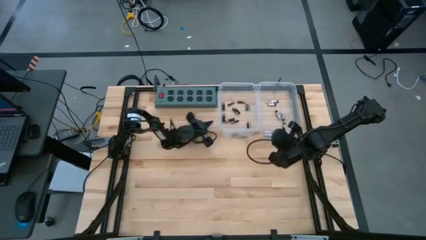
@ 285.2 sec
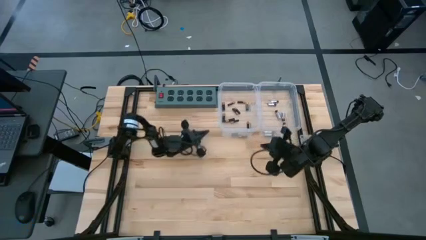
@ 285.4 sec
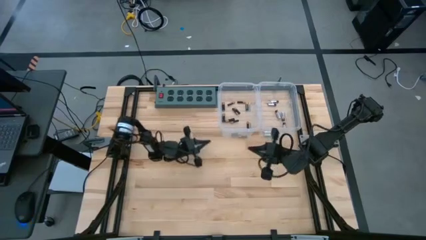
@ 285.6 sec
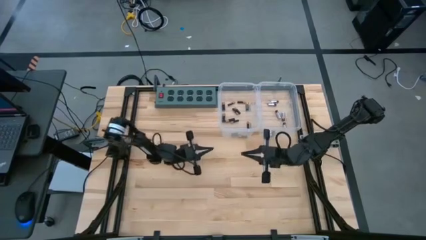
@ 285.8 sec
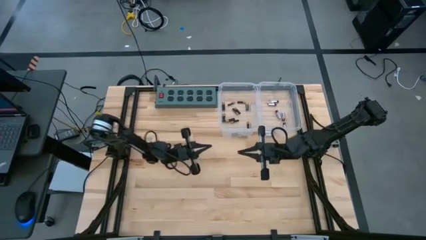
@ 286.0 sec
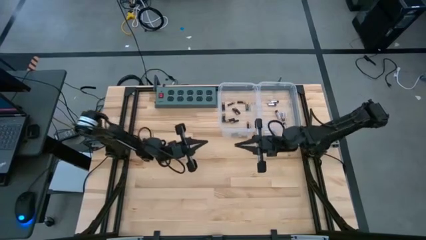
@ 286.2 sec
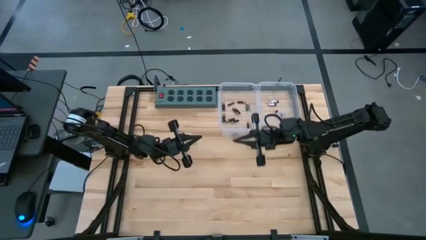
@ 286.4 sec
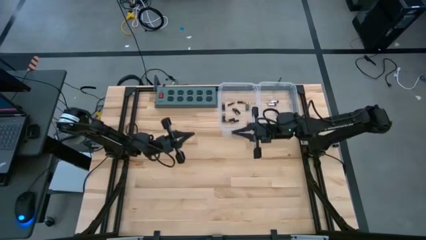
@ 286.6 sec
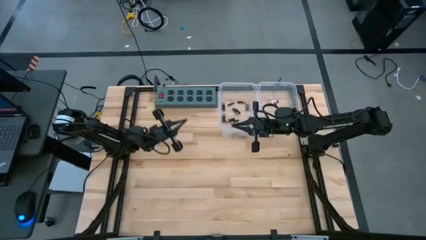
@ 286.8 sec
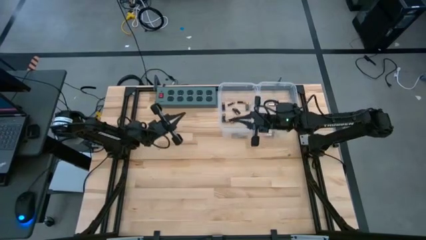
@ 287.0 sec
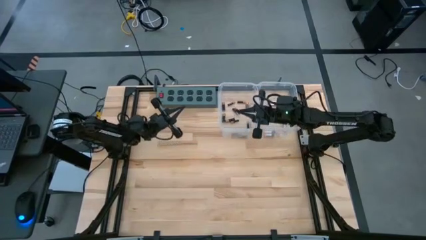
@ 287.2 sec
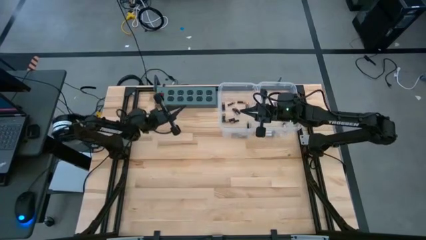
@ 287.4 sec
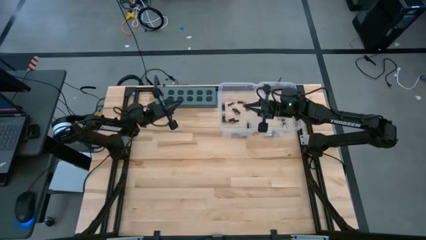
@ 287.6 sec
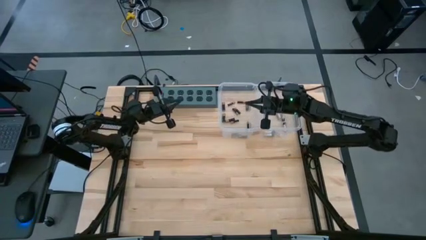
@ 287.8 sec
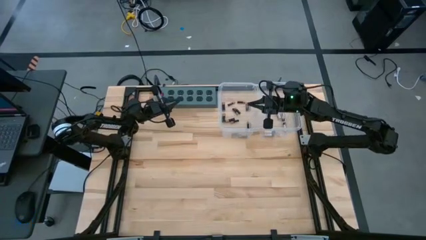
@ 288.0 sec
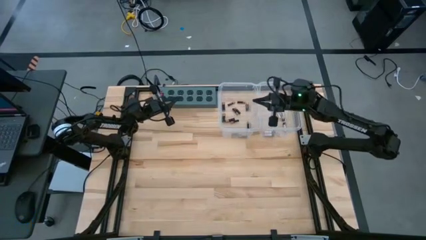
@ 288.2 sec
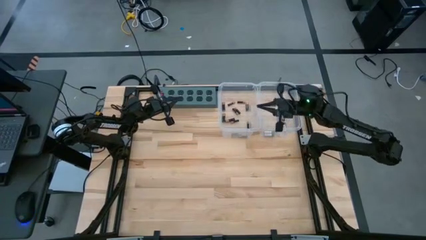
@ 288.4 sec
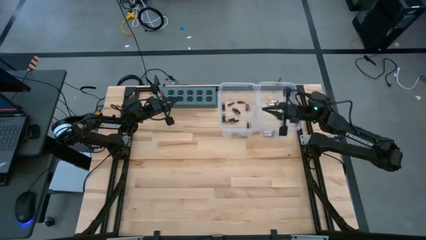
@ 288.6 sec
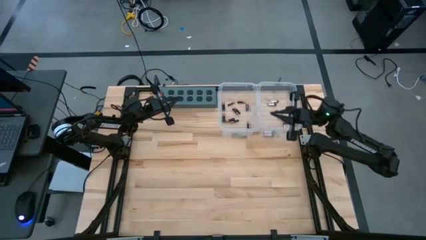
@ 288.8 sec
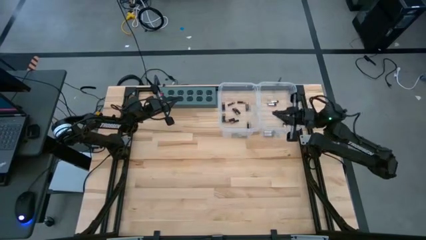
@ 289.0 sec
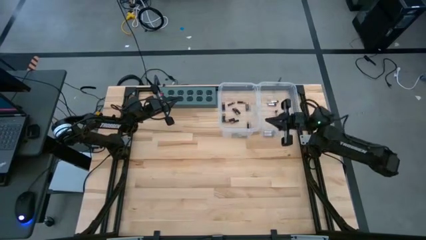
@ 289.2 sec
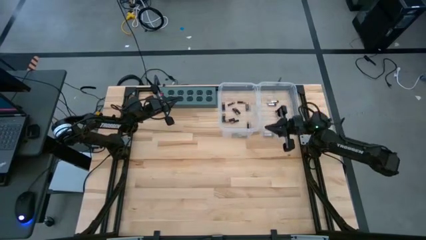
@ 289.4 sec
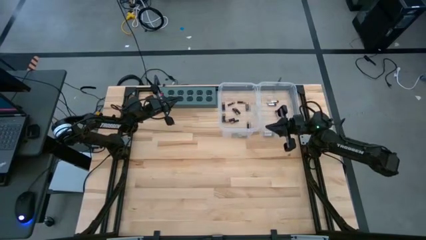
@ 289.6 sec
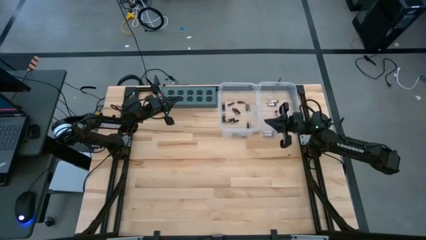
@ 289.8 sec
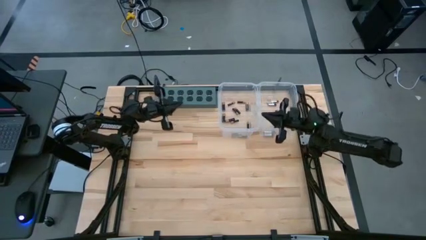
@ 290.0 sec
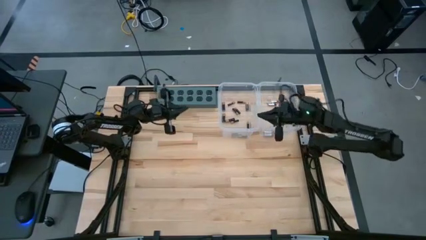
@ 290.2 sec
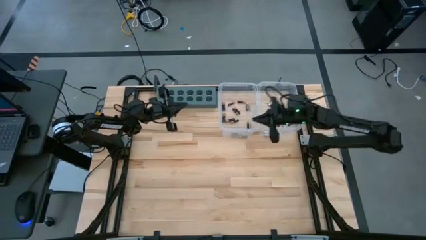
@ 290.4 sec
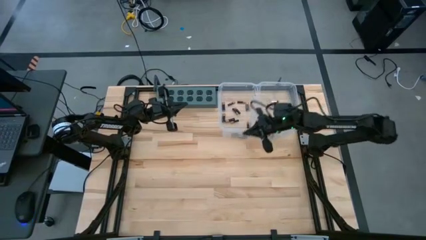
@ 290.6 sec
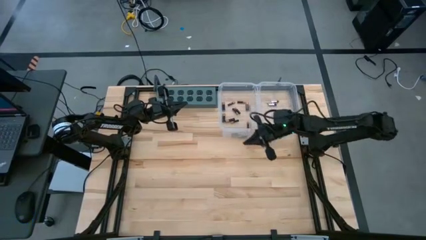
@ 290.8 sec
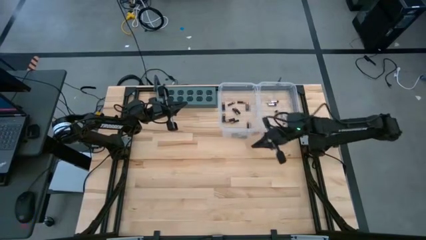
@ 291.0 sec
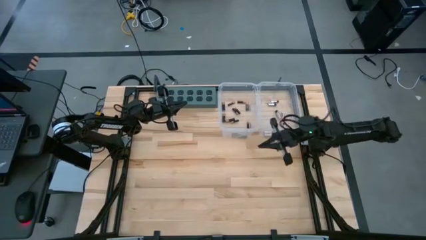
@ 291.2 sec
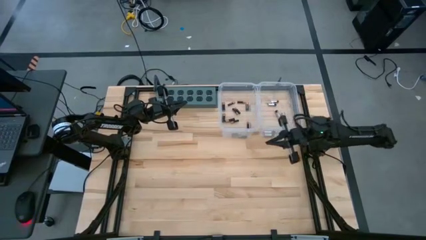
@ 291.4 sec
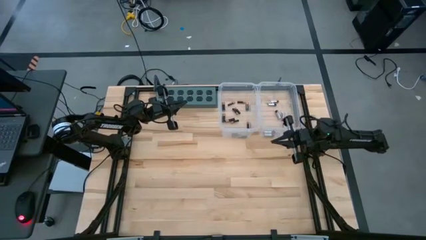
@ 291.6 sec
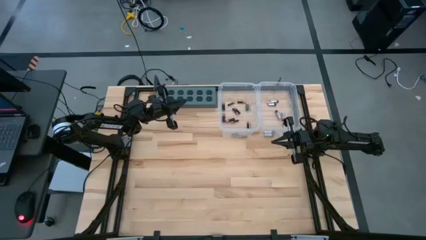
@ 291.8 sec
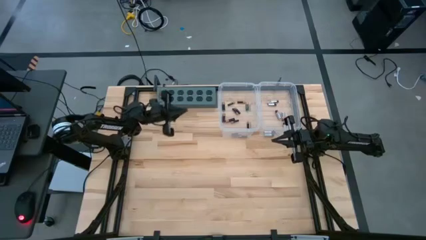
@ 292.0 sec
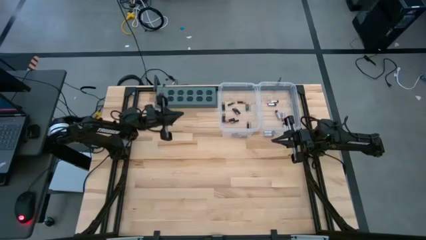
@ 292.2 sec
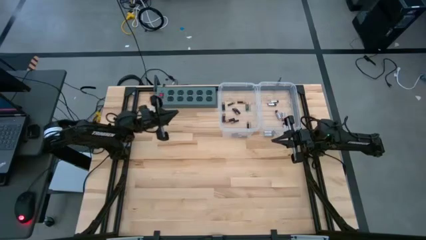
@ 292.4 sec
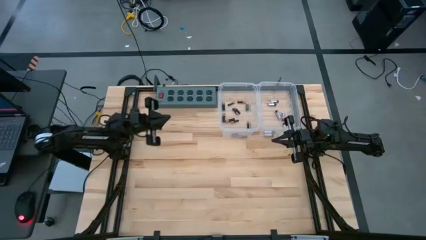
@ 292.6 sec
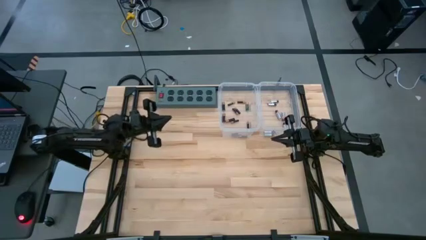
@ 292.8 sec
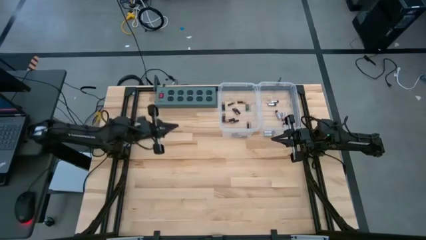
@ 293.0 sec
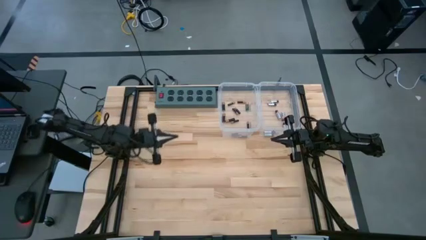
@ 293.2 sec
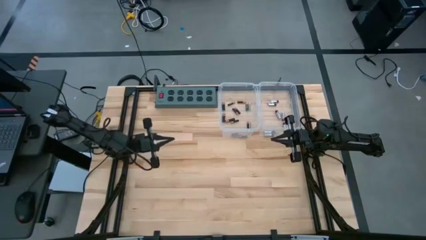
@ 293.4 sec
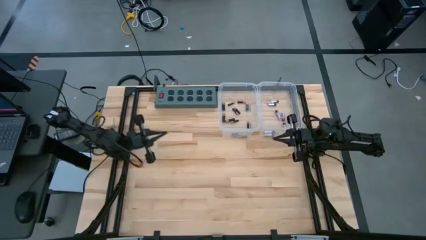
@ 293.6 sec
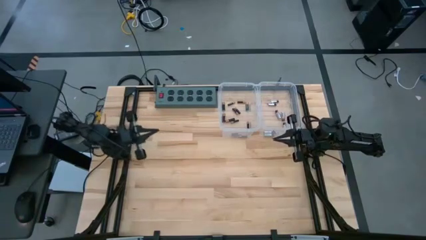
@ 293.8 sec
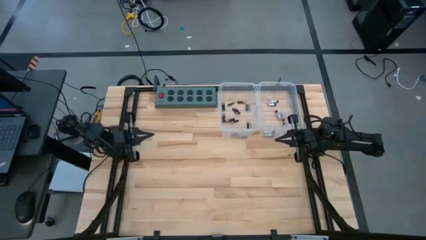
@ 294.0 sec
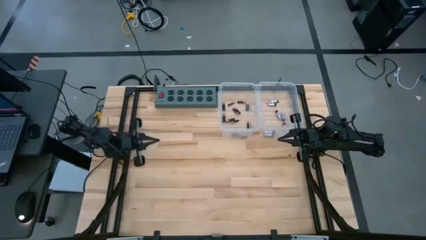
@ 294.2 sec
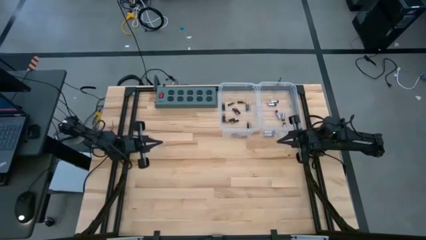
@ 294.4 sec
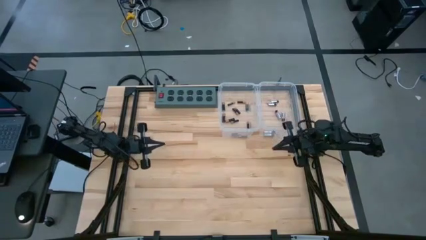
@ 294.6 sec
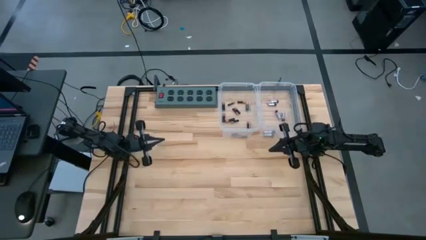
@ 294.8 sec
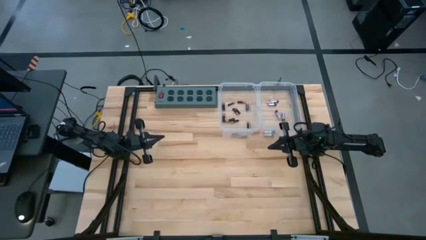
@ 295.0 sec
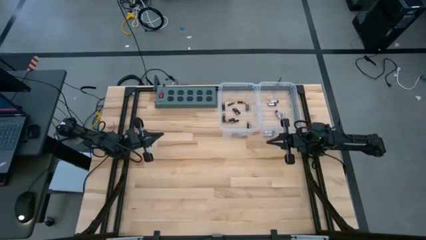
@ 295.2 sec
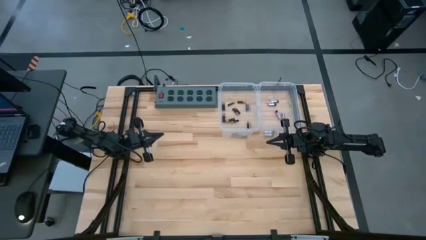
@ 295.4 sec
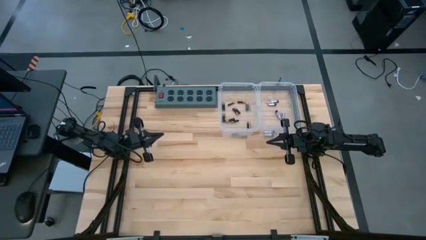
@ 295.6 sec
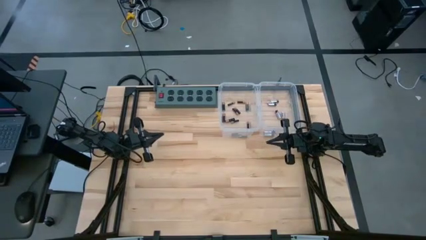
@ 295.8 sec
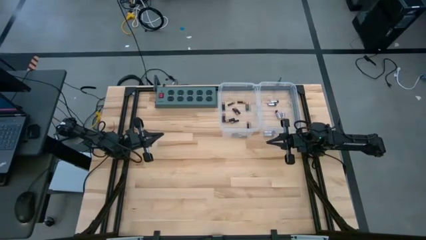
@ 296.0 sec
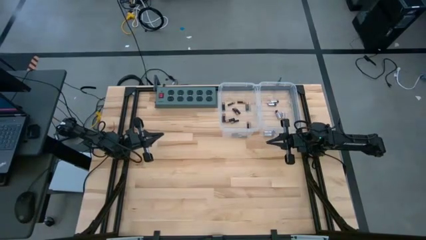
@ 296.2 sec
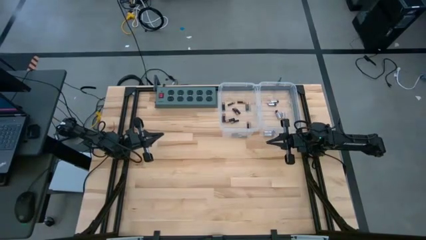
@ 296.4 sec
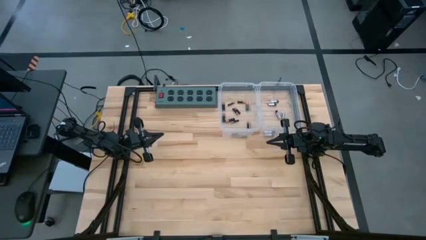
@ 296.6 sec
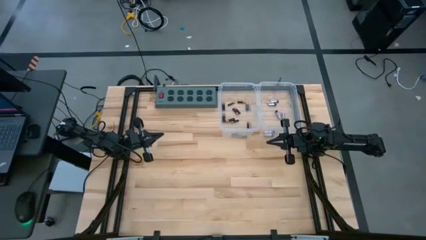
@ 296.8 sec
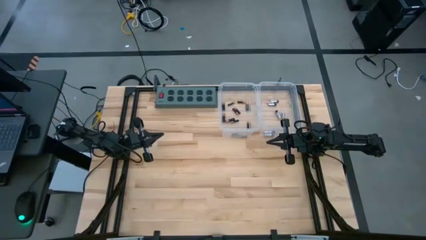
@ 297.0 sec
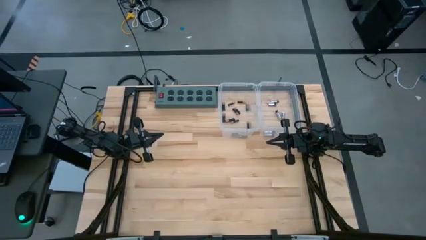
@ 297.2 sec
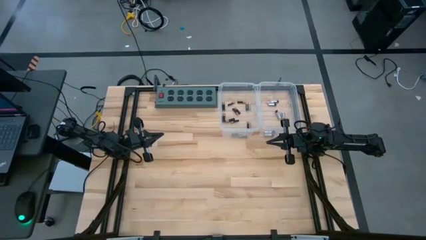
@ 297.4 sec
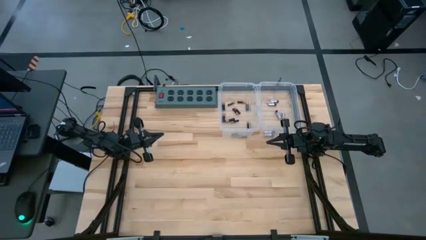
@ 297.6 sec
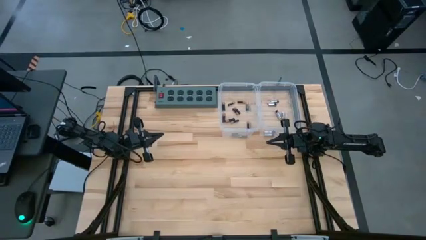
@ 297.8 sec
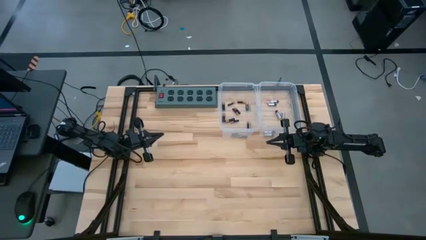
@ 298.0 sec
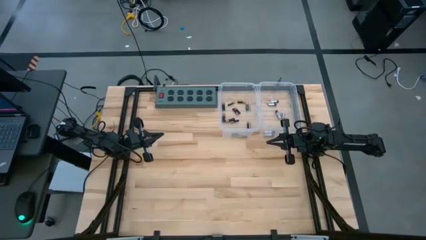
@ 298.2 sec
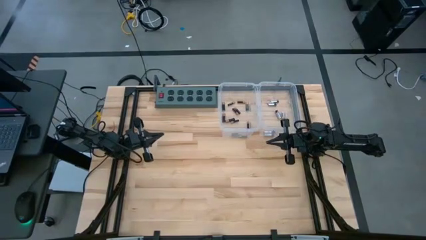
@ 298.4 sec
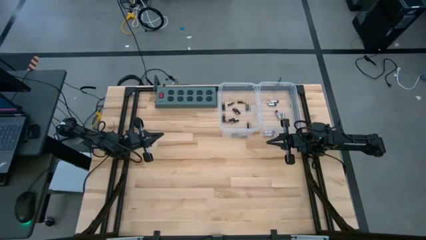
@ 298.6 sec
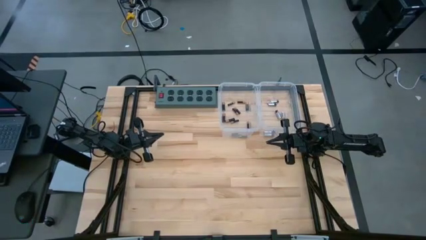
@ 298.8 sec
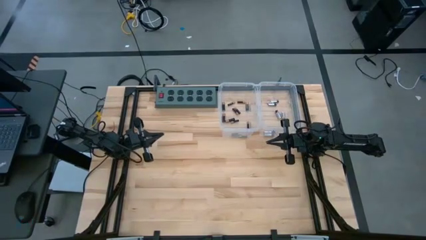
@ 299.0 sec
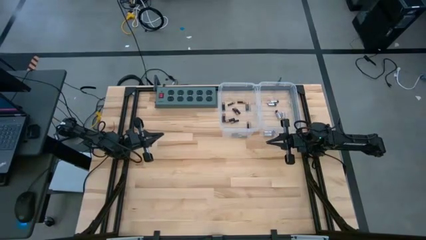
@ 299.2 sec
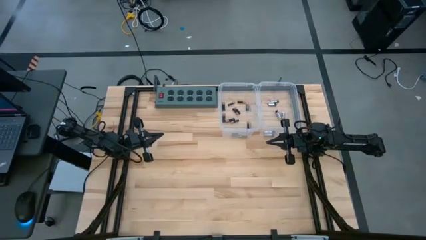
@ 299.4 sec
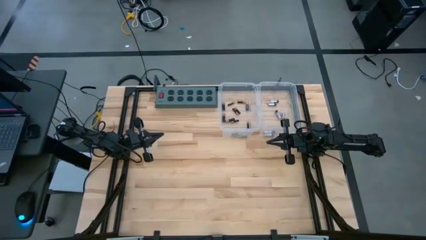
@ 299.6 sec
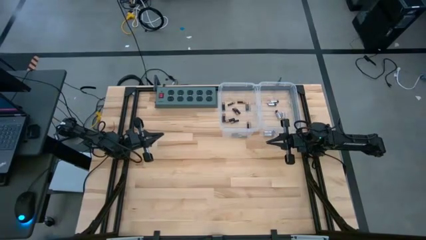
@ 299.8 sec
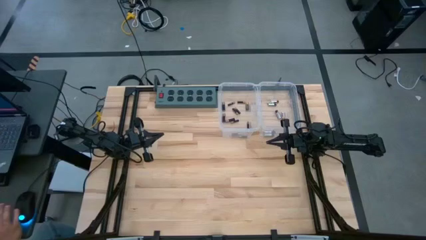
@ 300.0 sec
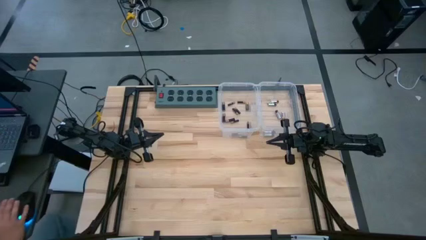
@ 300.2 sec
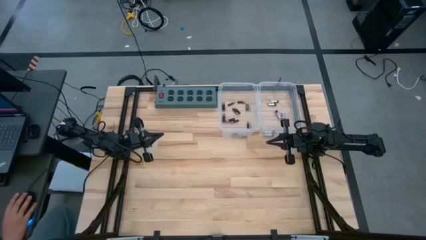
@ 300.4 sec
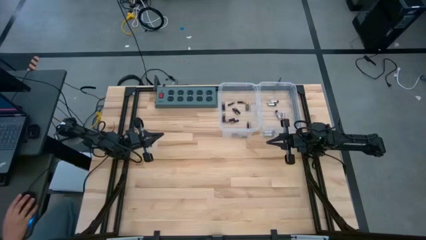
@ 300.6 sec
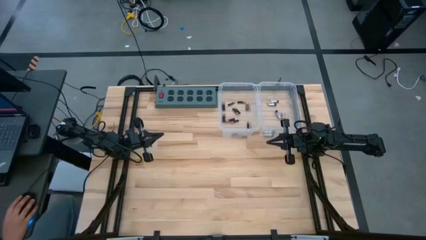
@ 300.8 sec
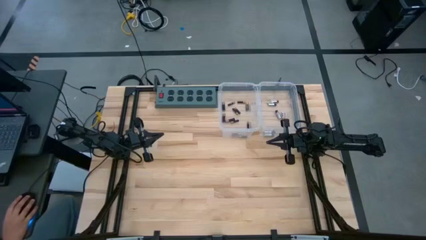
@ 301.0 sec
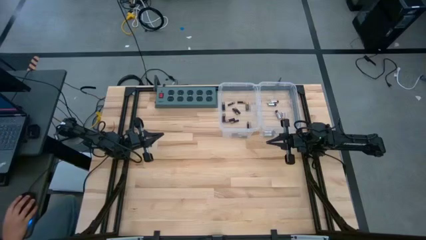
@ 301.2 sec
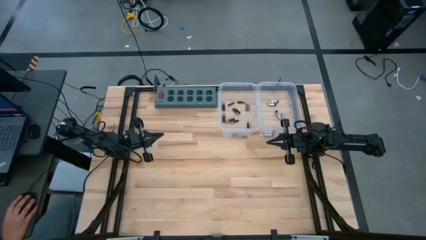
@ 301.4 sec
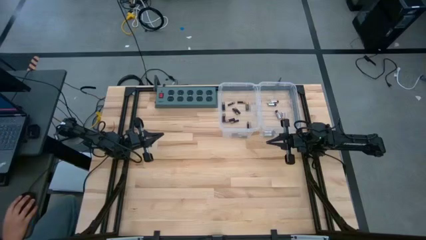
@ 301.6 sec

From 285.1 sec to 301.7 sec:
Task: Sort batteries
Return to Home Position

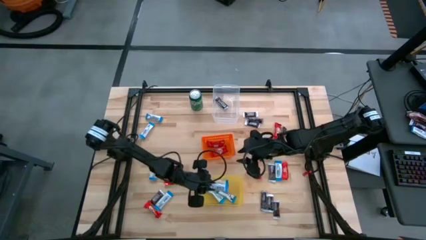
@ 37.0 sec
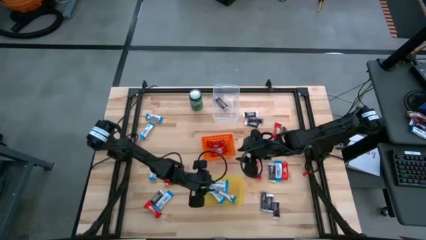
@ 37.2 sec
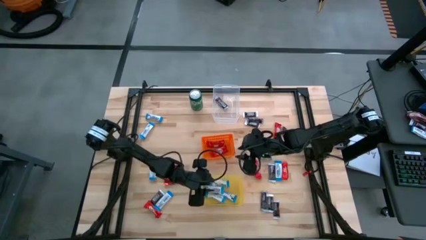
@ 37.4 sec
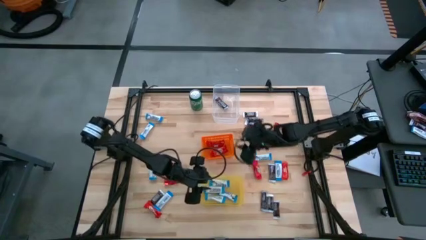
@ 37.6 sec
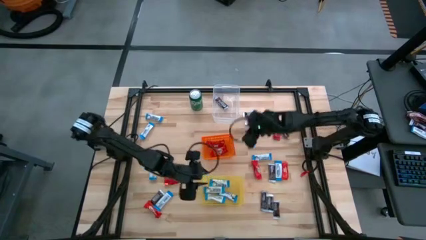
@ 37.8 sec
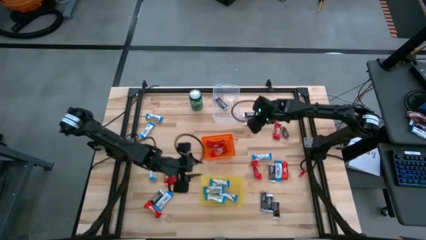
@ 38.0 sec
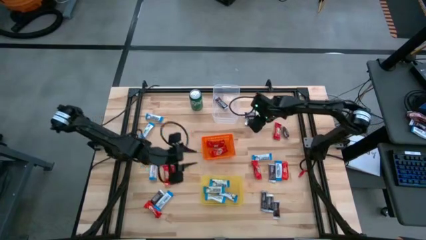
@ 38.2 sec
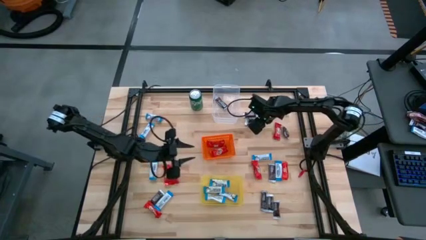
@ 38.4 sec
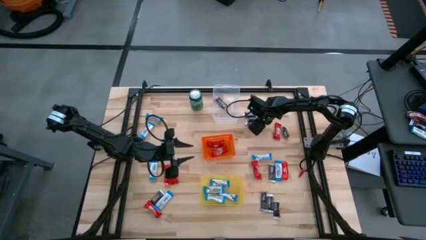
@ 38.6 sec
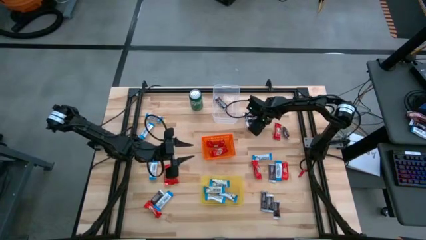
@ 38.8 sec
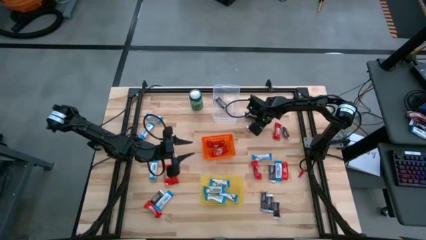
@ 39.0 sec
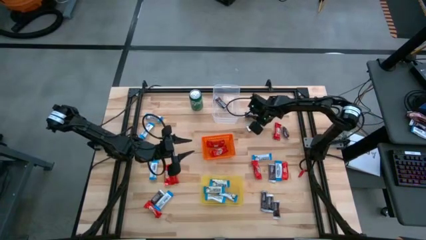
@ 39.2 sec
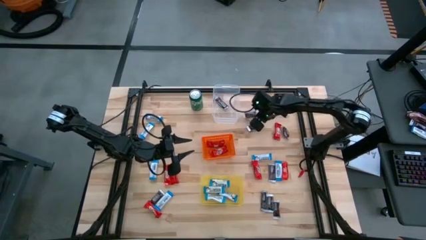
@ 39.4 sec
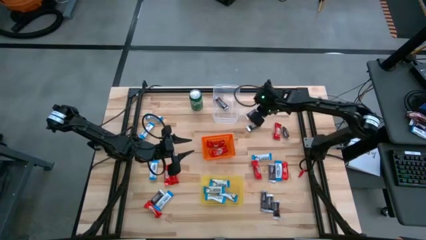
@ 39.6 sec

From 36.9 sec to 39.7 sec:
Task: Sort candy
Put the black candy into the transparent bin
